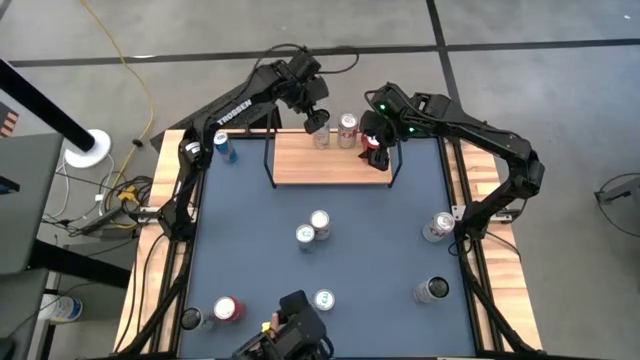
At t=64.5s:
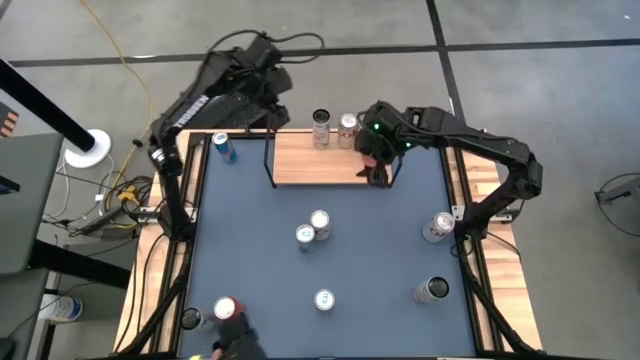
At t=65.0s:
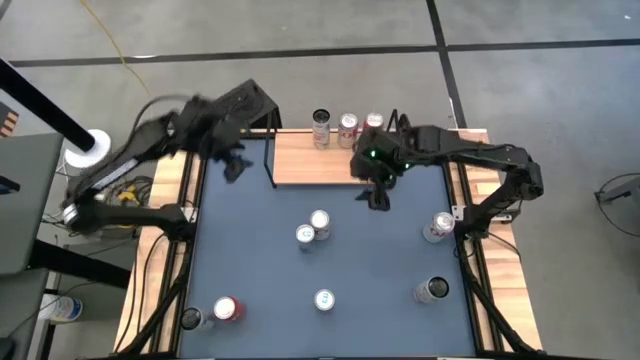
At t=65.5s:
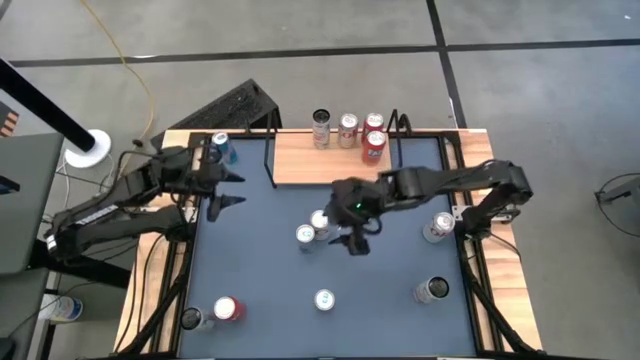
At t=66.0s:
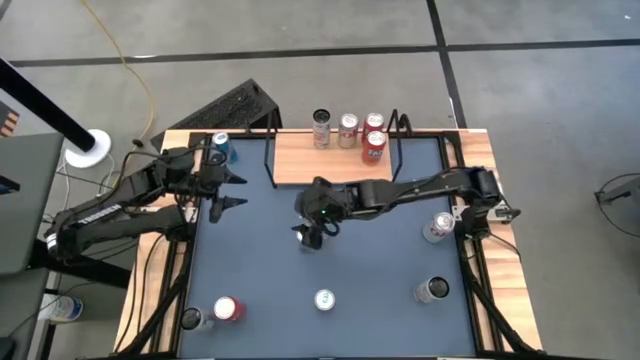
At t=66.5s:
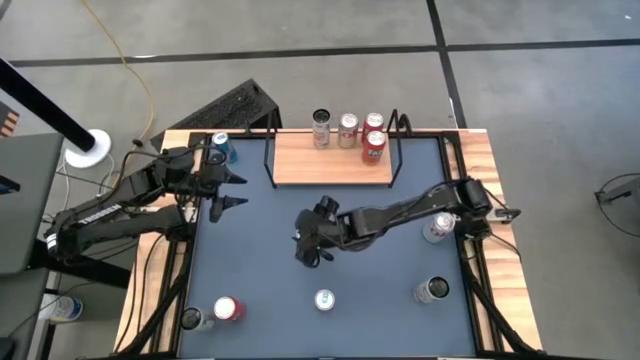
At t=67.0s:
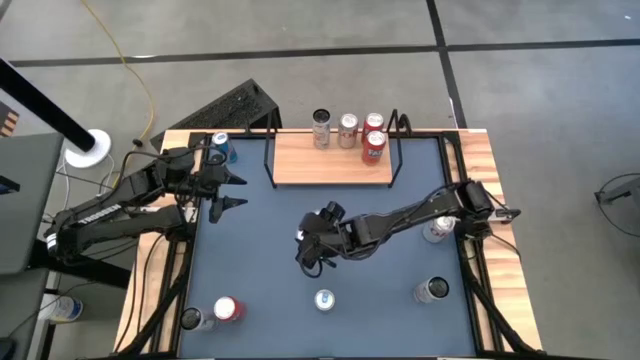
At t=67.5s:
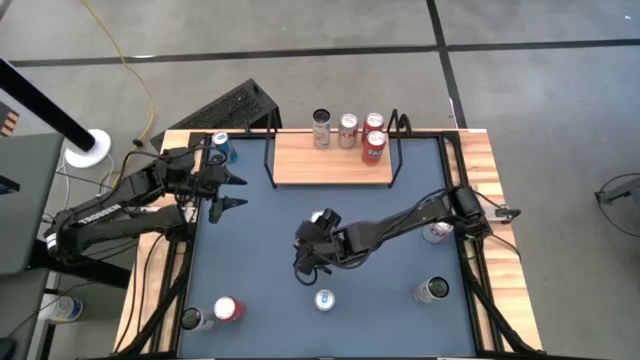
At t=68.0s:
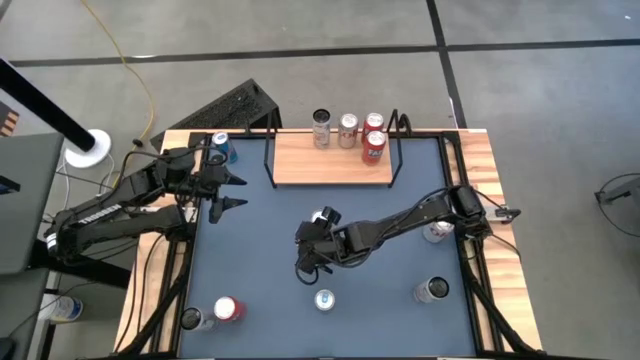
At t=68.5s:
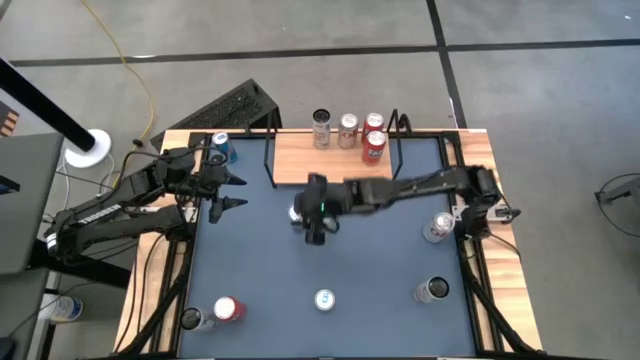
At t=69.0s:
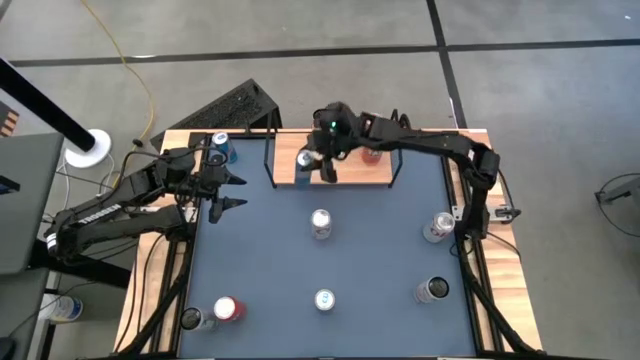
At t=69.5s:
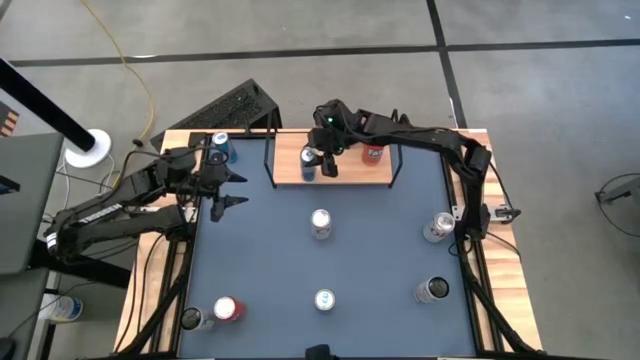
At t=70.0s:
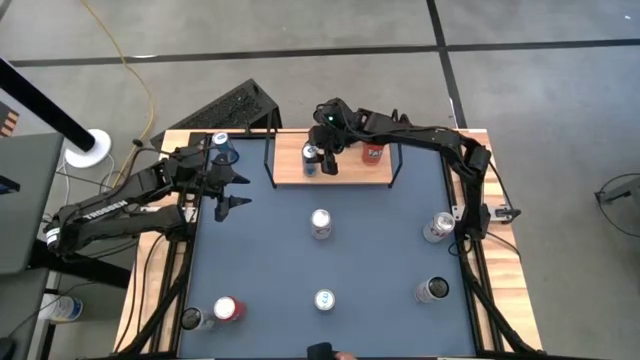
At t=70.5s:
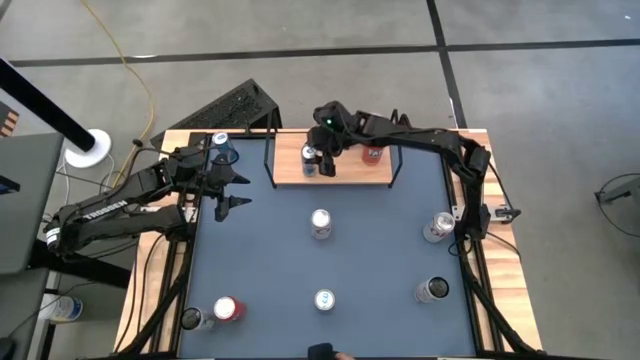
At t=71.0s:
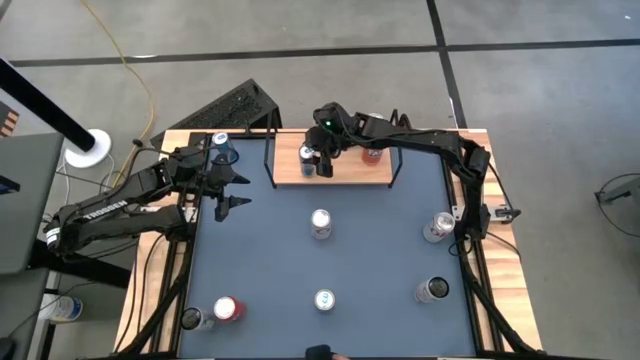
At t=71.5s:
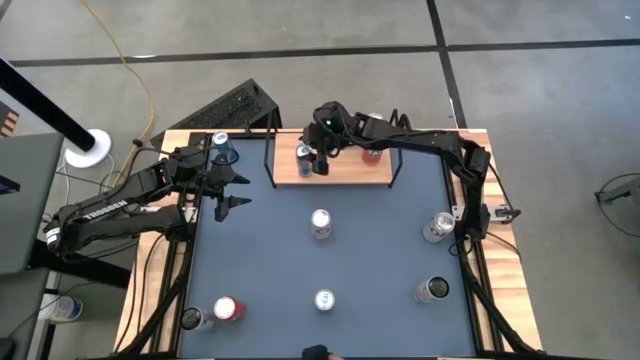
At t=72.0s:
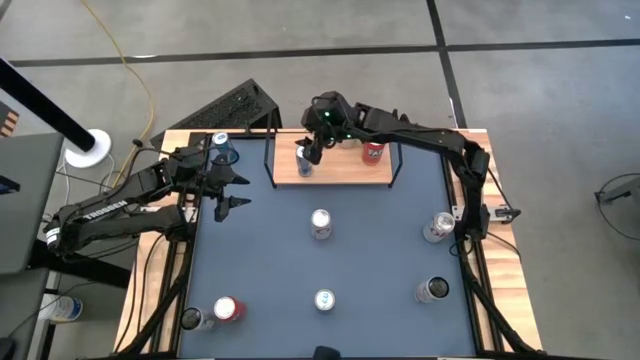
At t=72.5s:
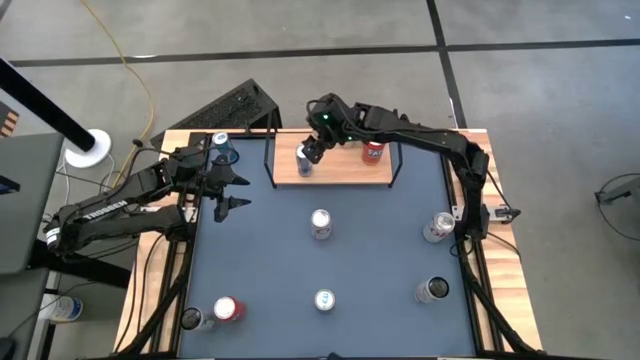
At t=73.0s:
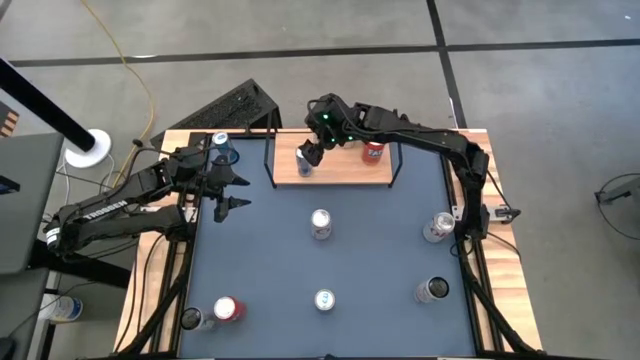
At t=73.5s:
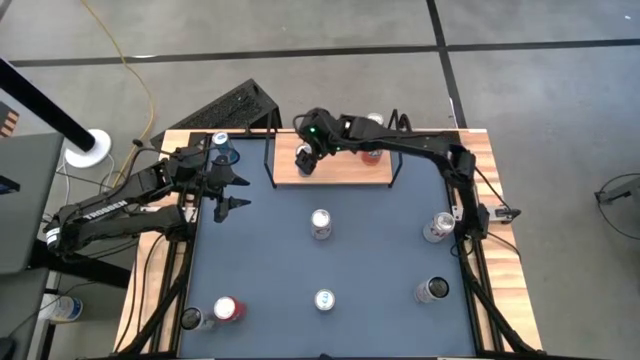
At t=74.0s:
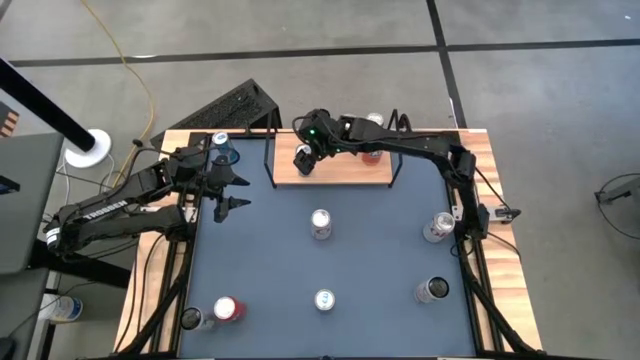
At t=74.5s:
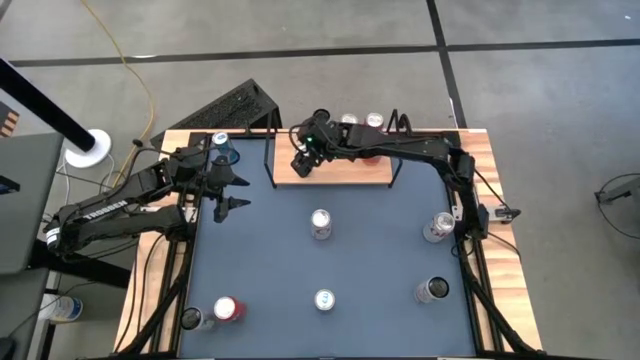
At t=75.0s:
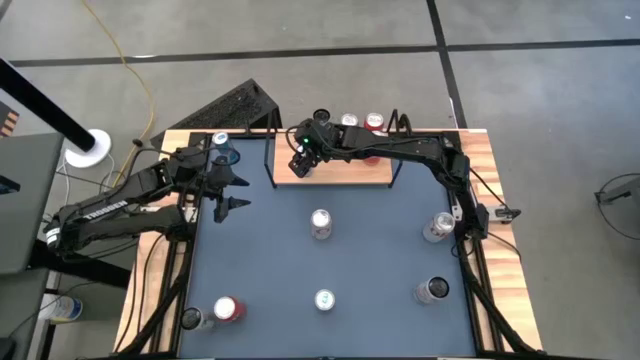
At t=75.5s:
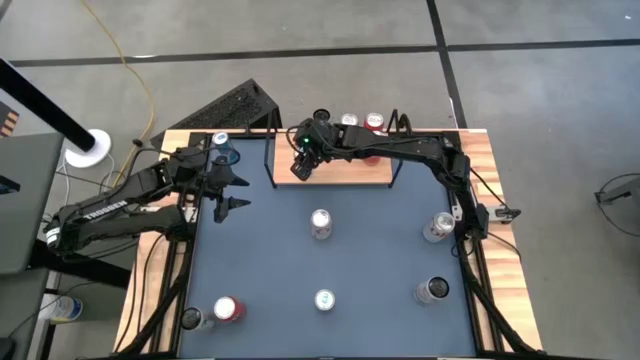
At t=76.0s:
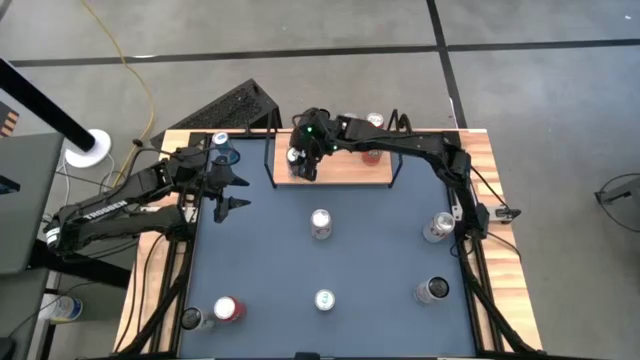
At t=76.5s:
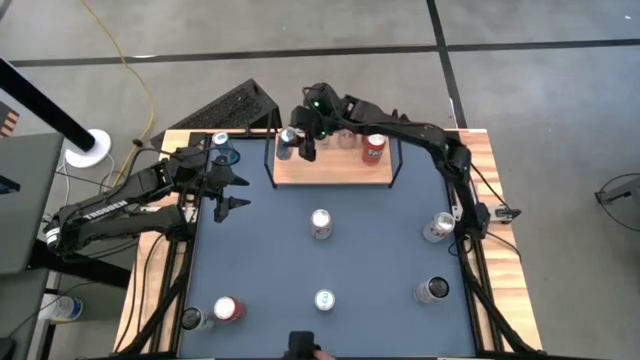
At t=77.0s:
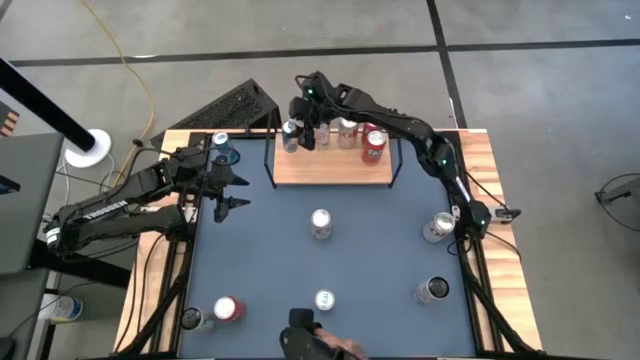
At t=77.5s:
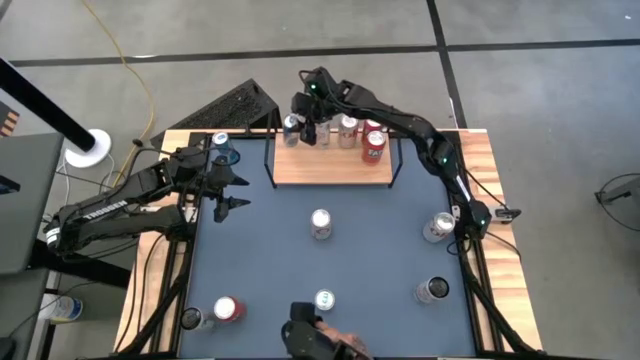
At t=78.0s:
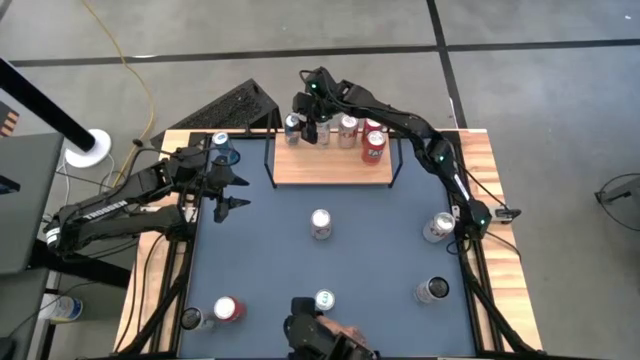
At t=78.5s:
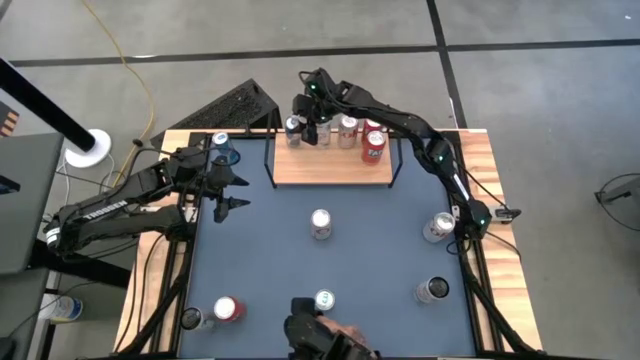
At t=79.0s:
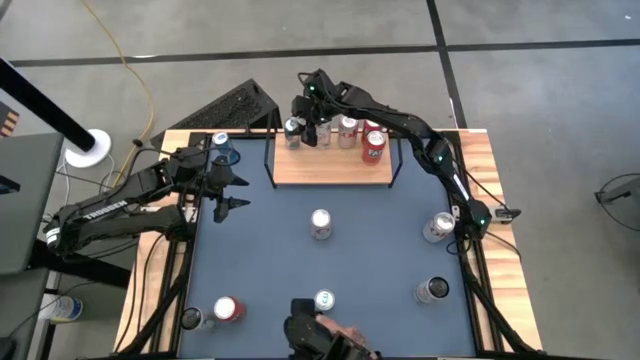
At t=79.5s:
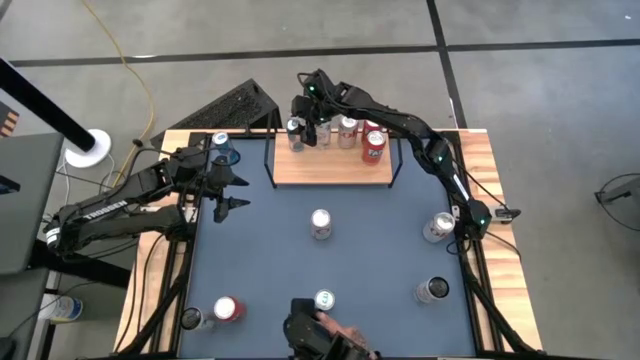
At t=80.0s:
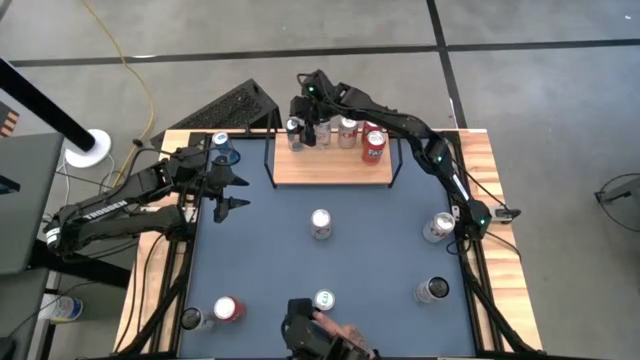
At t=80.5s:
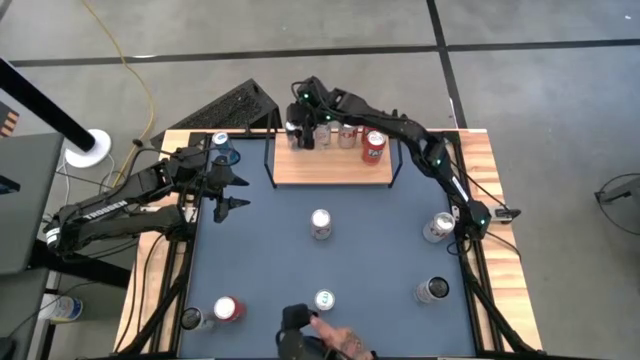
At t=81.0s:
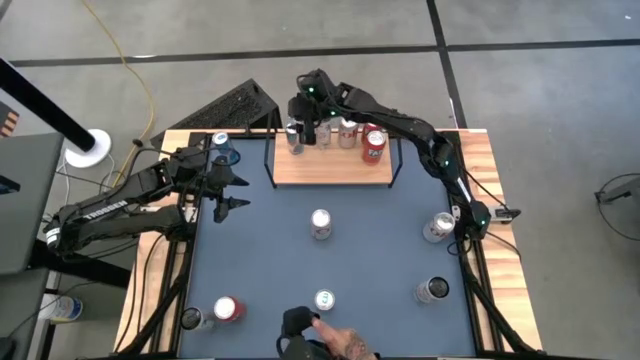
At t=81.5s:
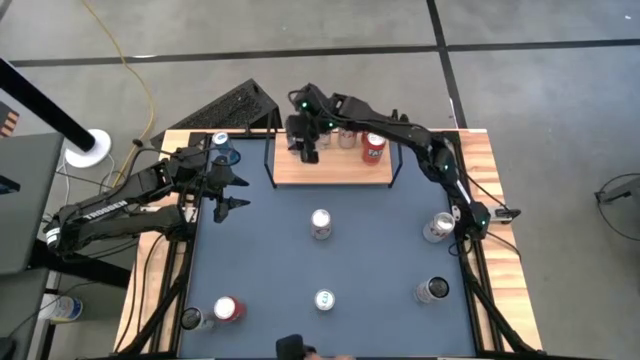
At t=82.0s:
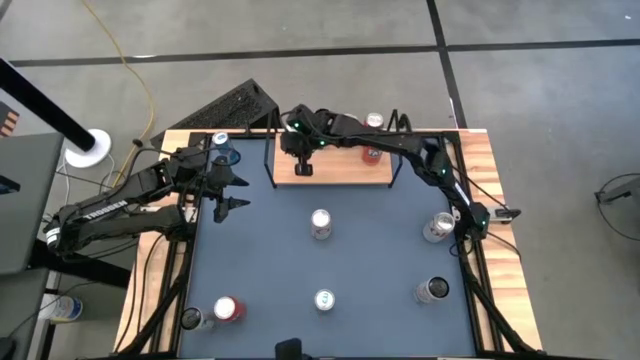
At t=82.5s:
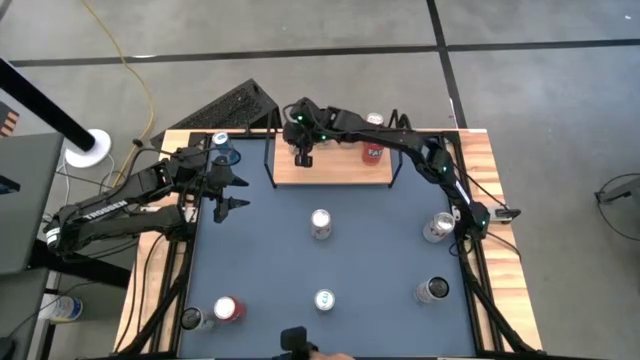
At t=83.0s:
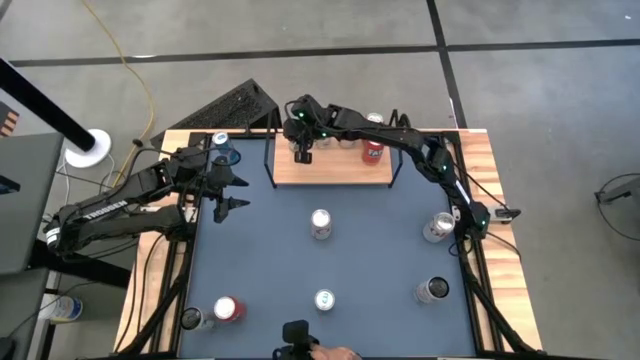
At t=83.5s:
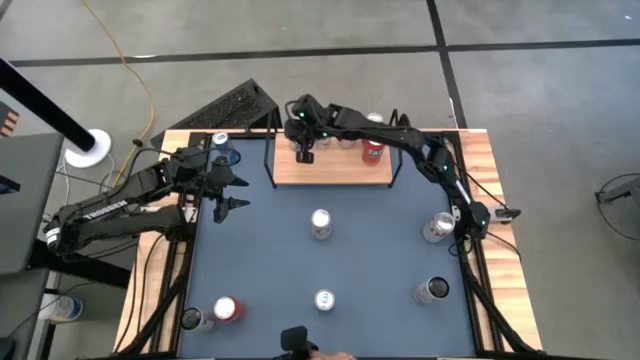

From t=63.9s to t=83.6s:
Task: Place canned beverage on shelf
Put the center blue soda can on the shelf

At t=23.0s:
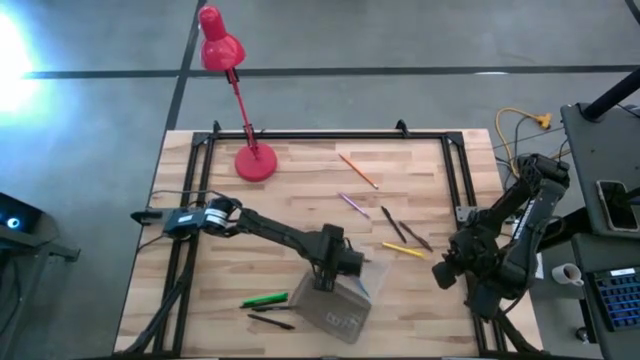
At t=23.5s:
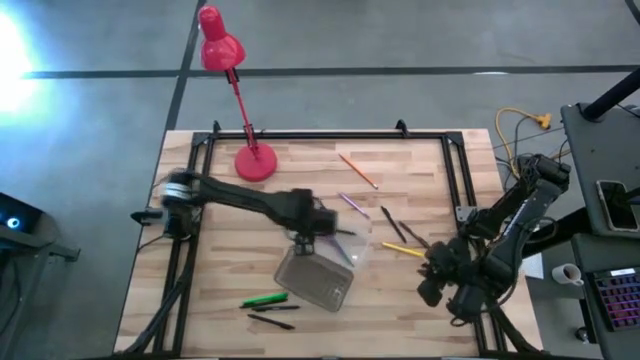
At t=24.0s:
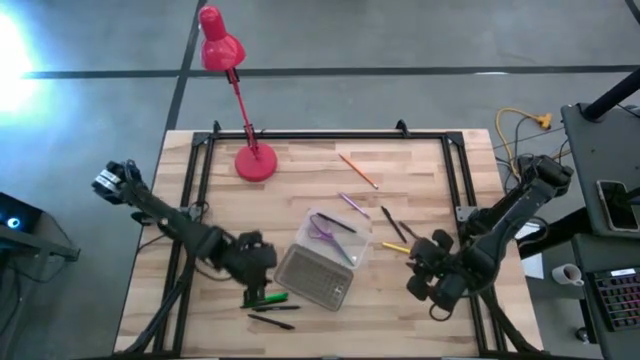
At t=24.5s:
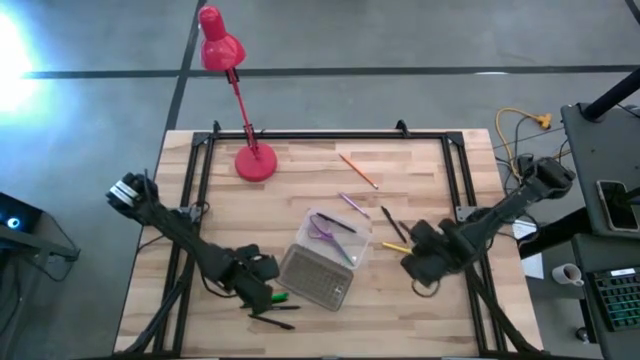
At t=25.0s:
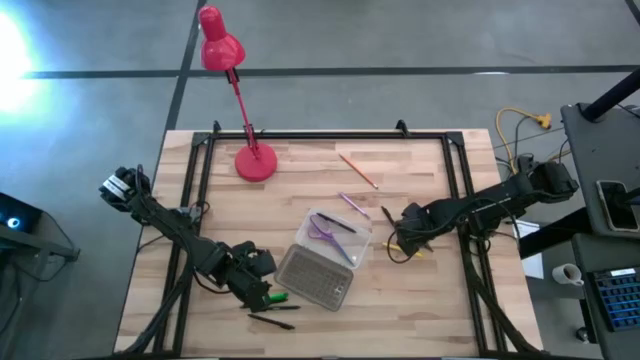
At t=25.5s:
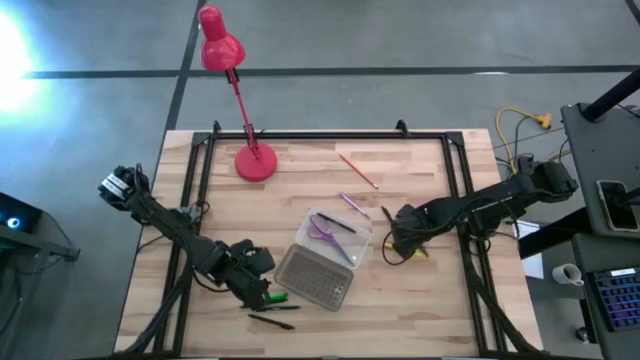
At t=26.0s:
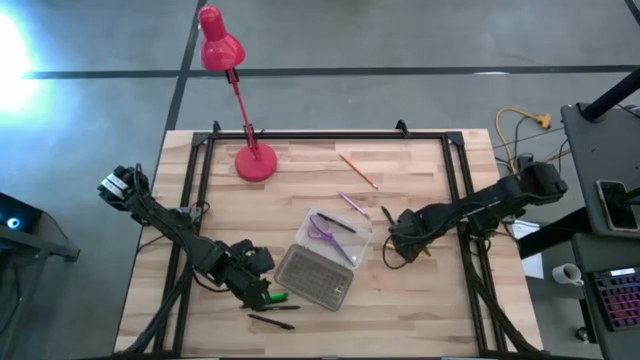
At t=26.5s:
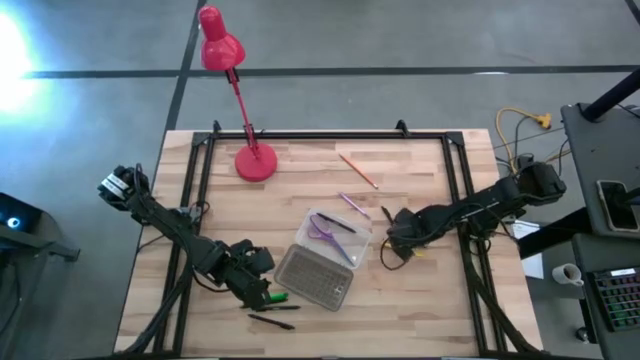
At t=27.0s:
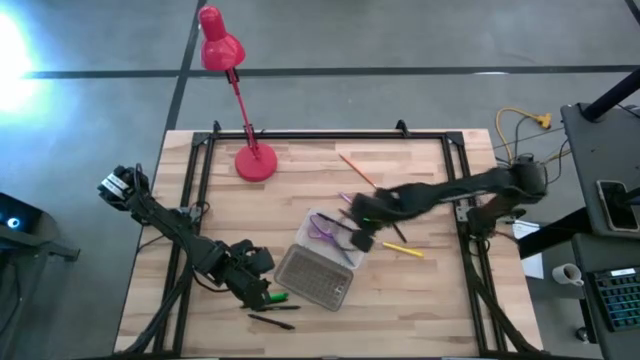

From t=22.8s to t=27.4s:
Task: Pick & place school supplies into a supply box
Put the brown pen into the supply box
